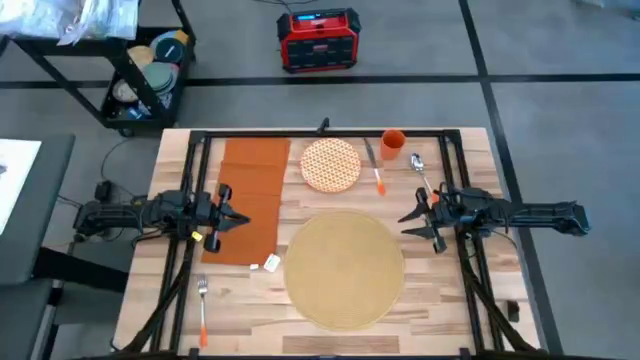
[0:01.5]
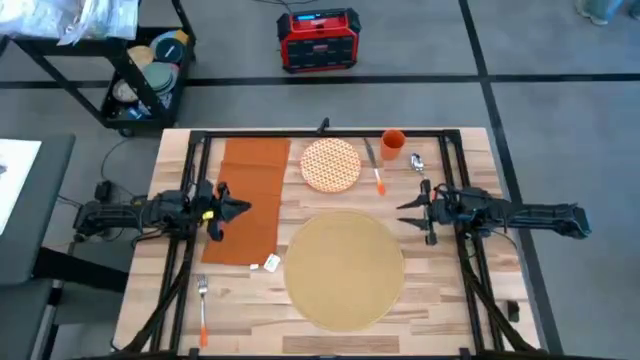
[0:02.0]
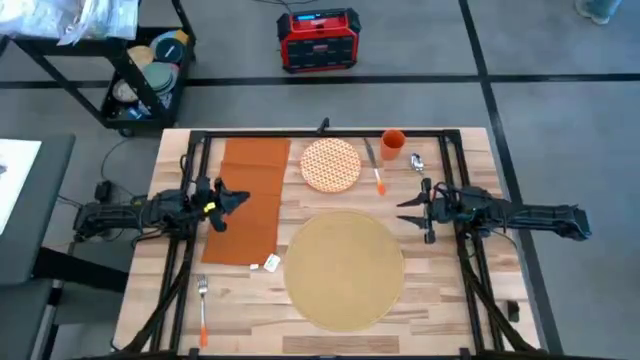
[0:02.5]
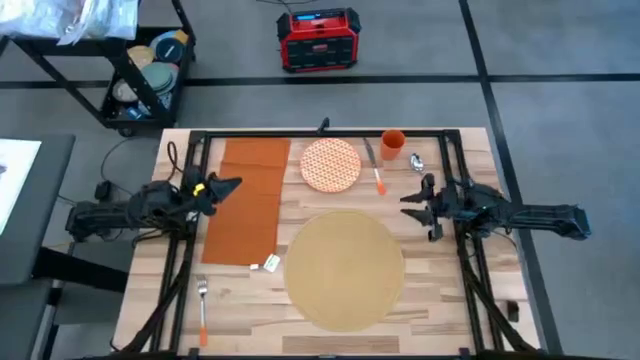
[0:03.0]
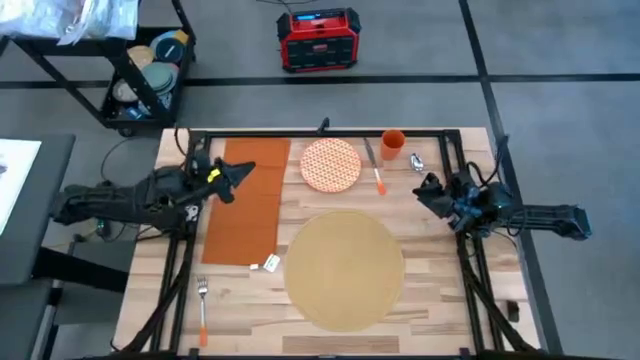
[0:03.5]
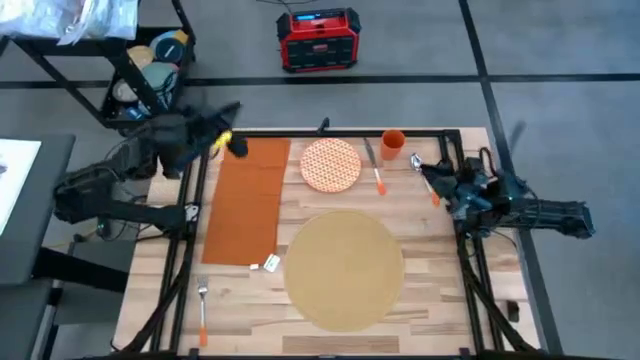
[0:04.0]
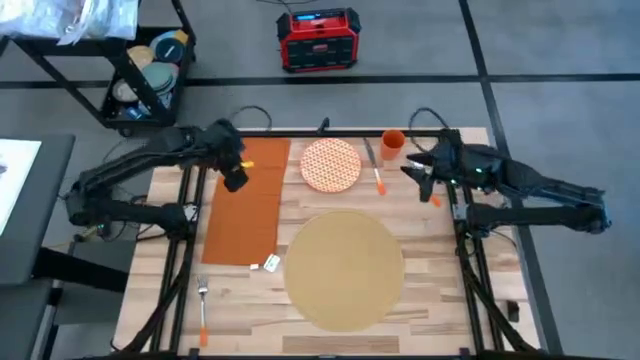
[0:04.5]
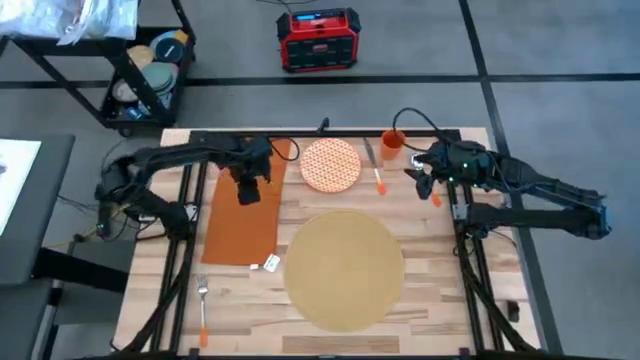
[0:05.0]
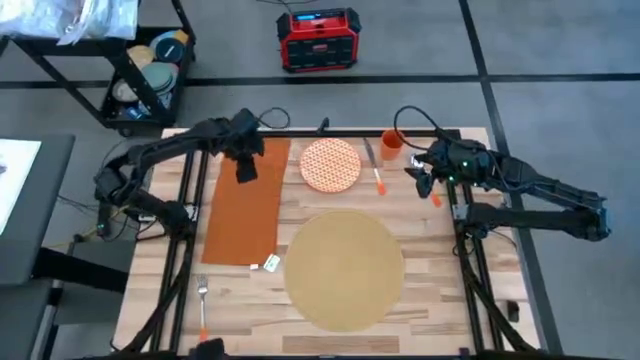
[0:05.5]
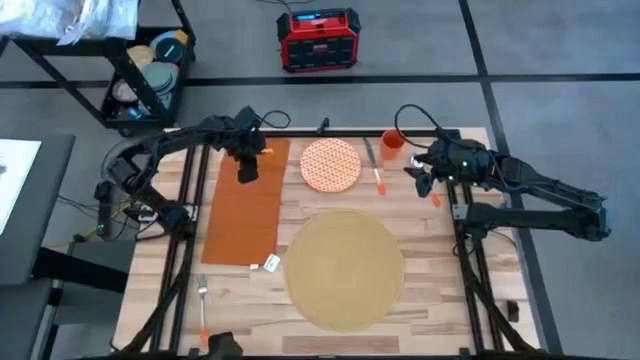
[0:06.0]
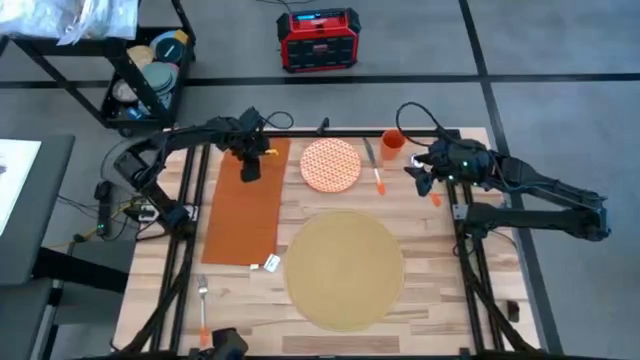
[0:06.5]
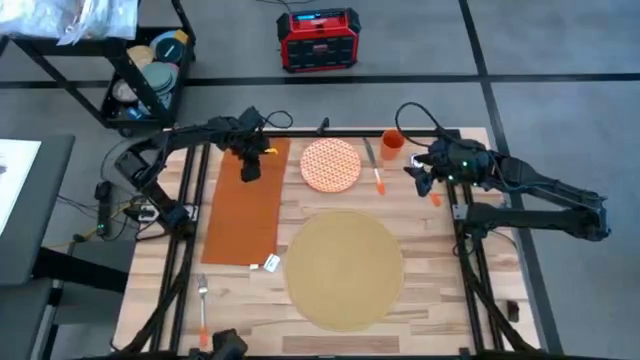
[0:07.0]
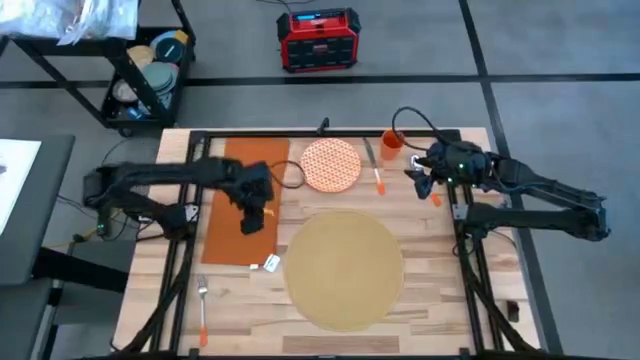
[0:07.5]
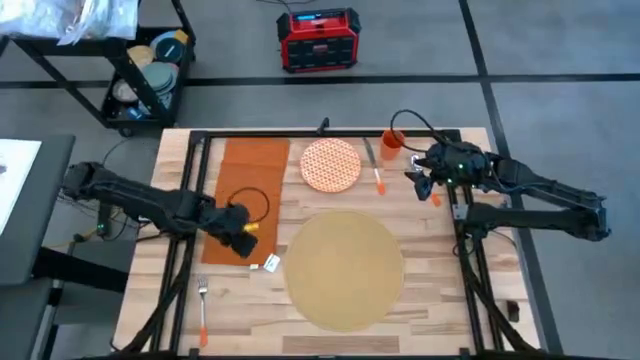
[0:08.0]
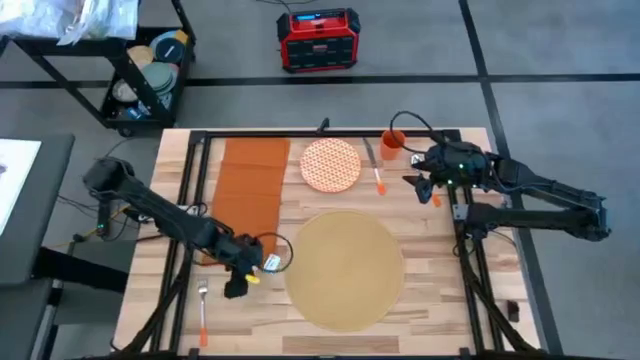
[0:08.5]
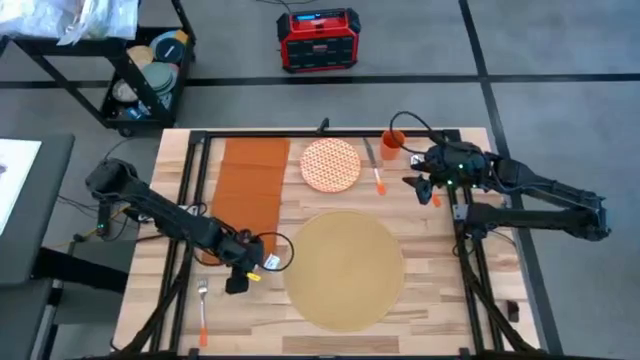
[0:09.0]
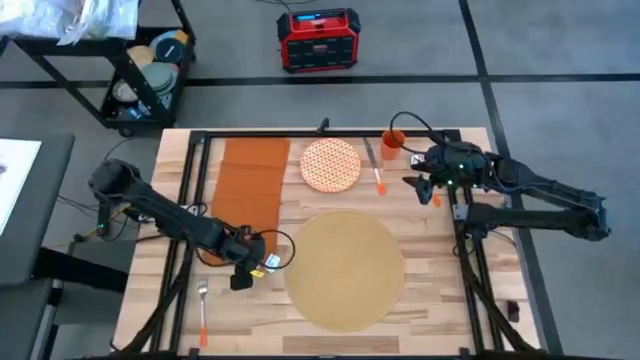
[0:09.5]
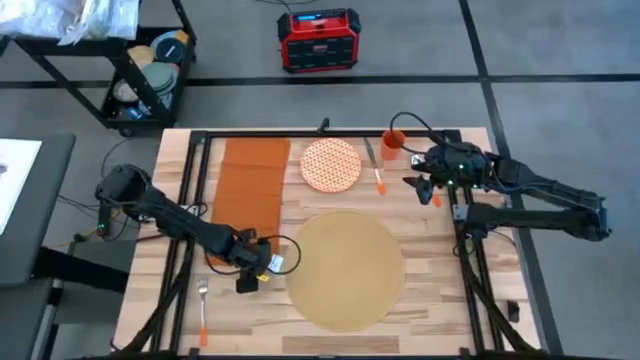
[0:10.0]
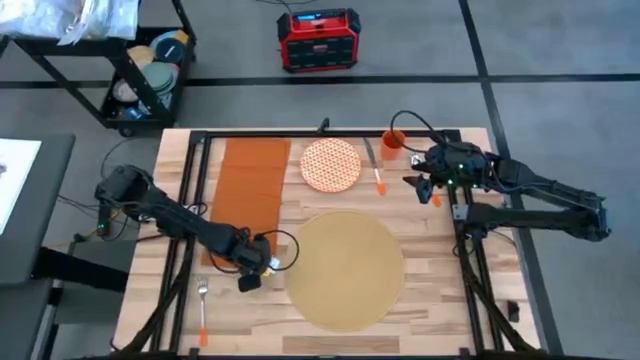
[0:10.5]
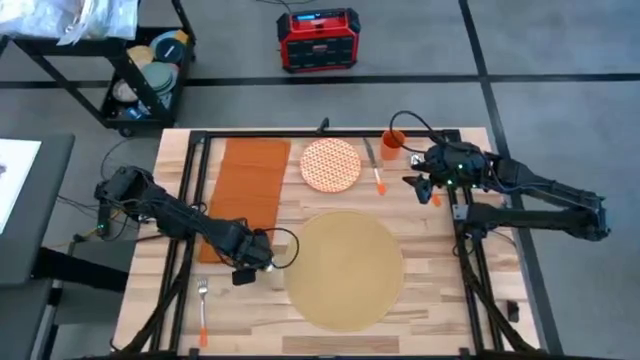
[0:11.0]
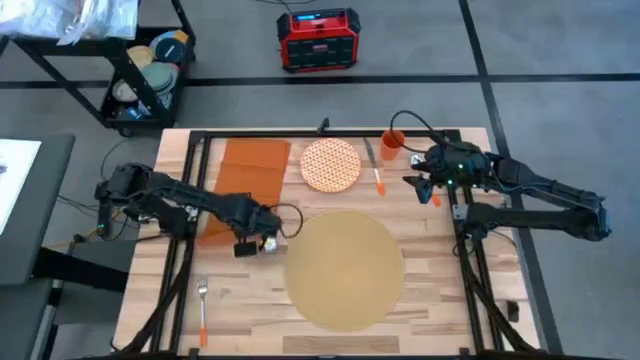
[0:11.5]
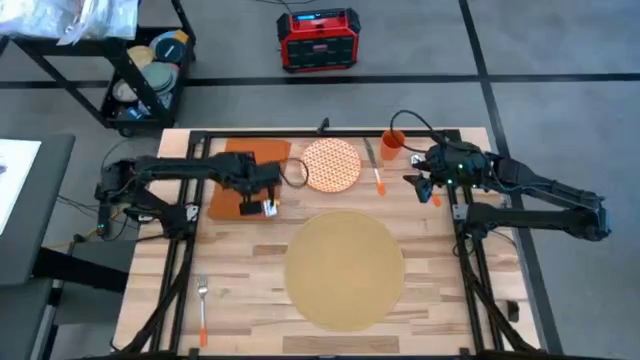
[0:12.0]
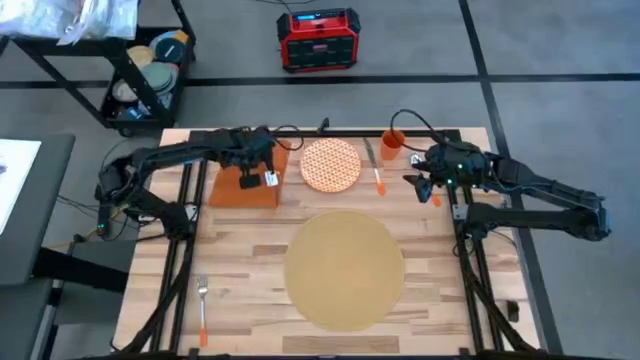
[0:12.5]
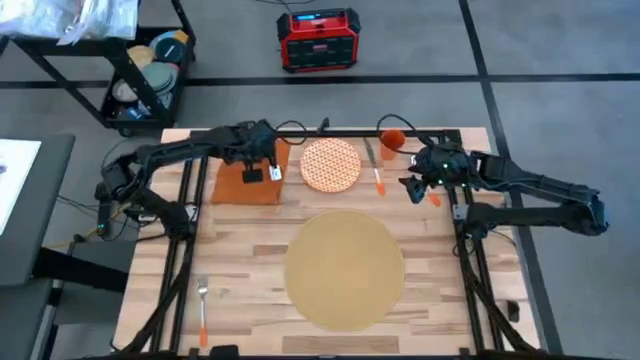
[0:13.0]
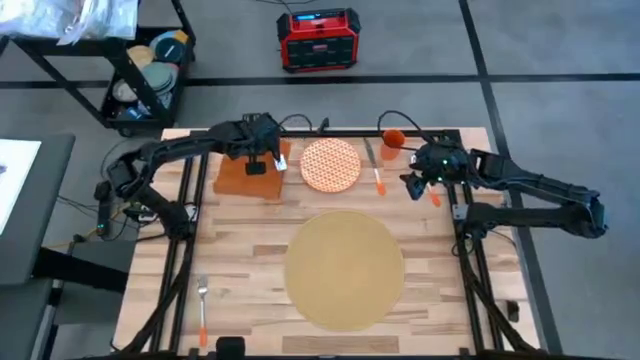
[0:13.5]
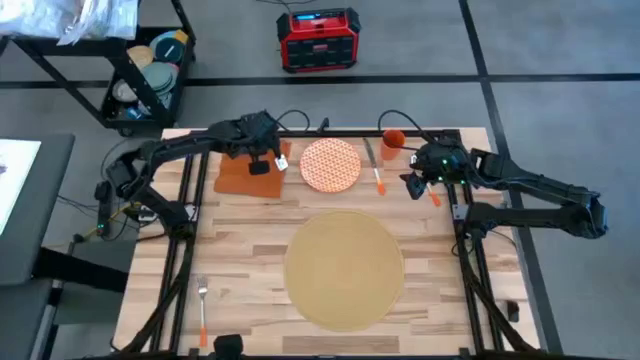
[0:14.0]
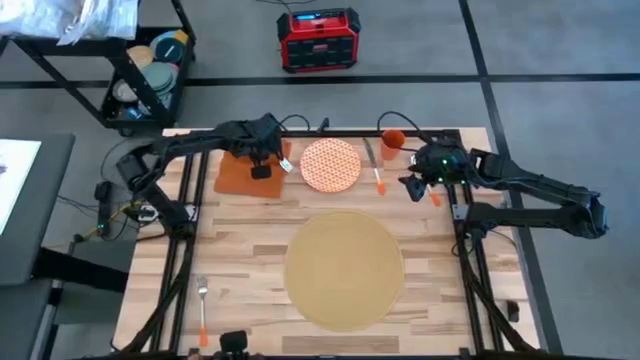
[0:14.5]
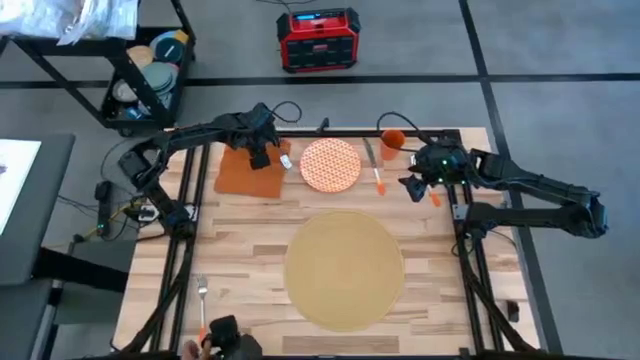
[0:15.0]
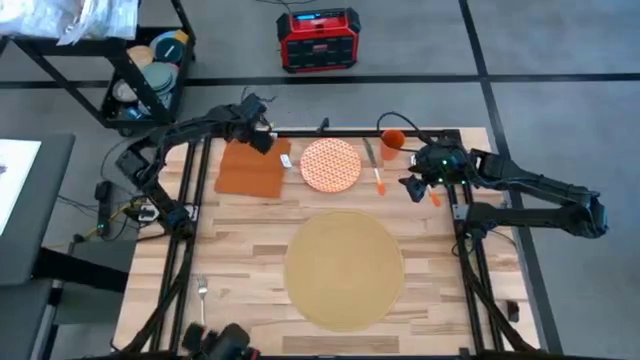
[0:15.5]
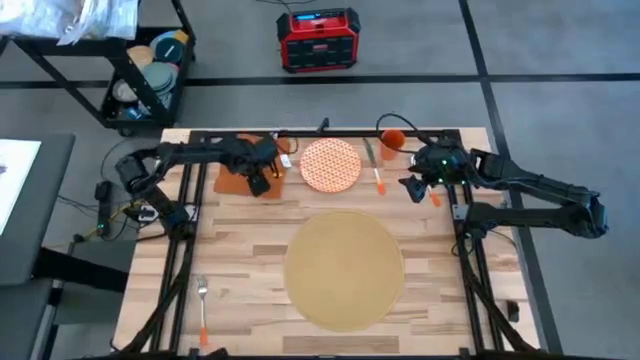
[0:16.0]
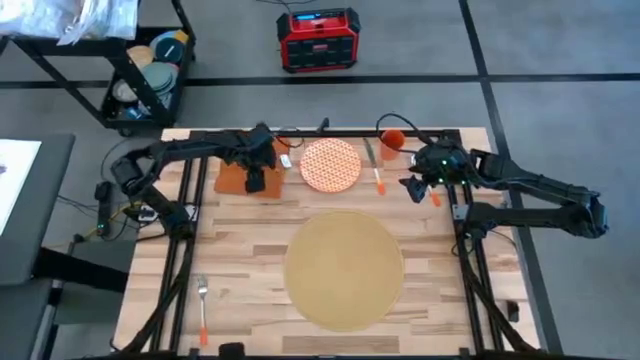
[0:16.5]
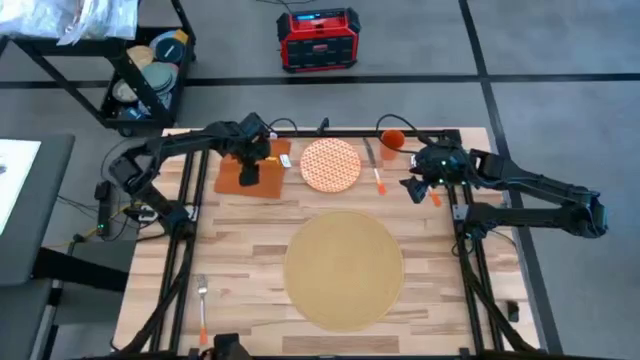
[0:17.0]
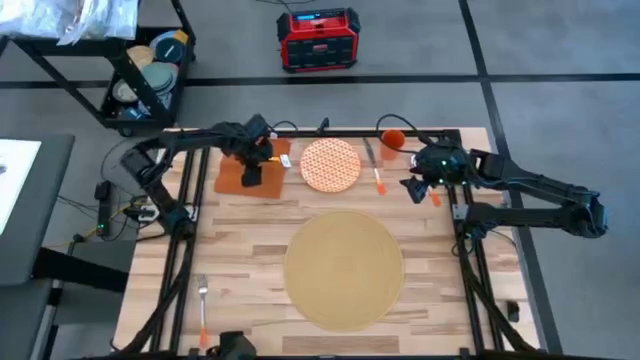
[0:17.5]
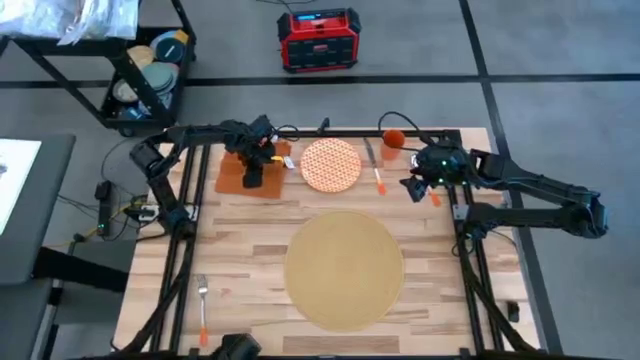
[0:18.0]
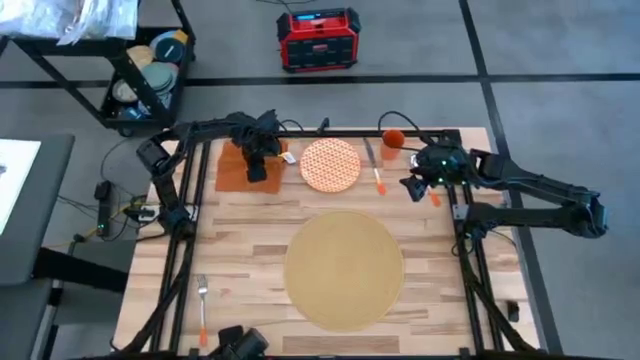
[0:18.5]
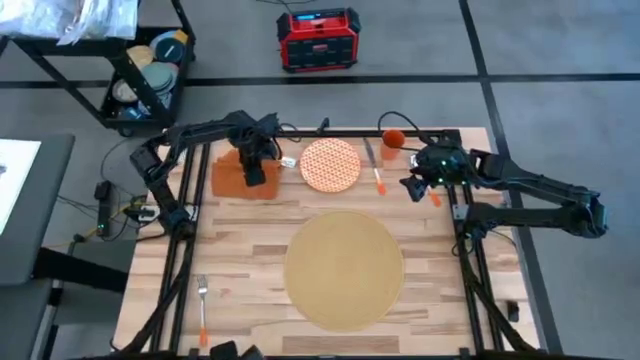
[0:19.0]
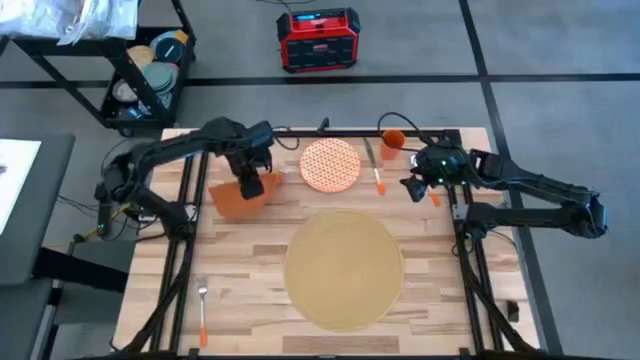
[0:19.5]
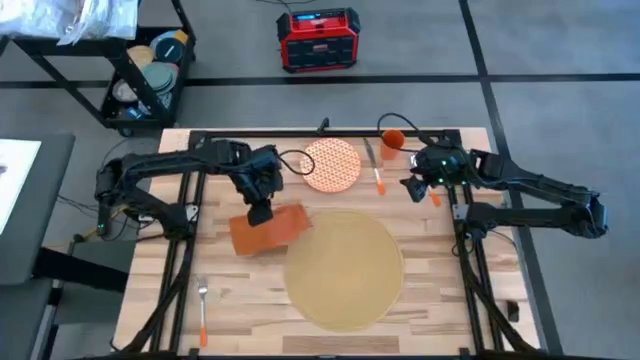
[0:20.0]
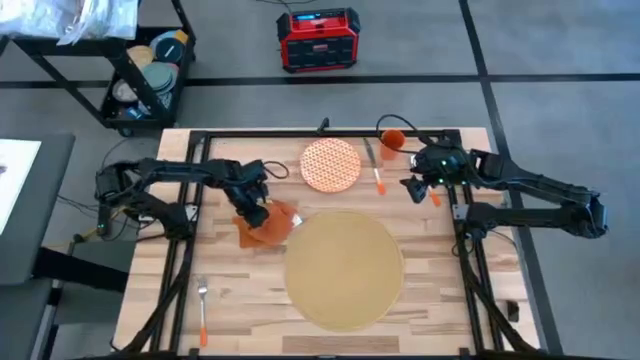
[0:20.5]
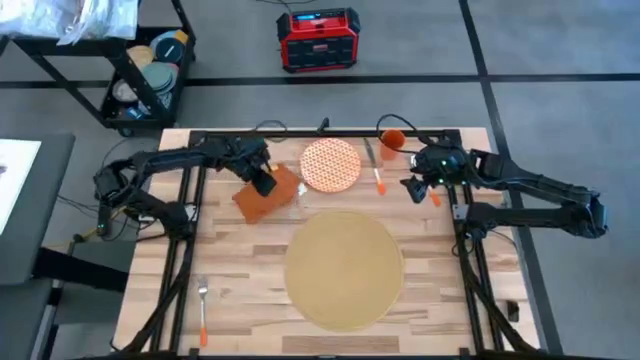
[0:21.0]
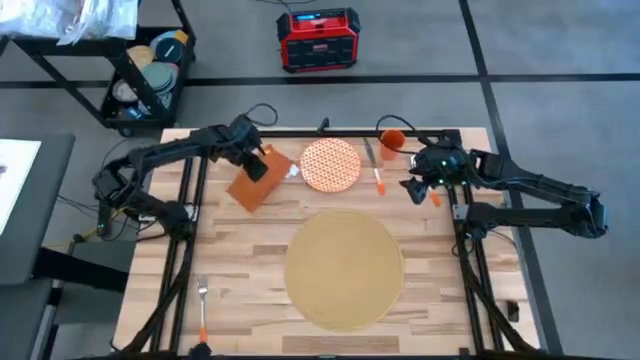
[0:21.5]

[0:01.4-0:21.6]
Task: Set table place
Fold the orange table napkin on the table
